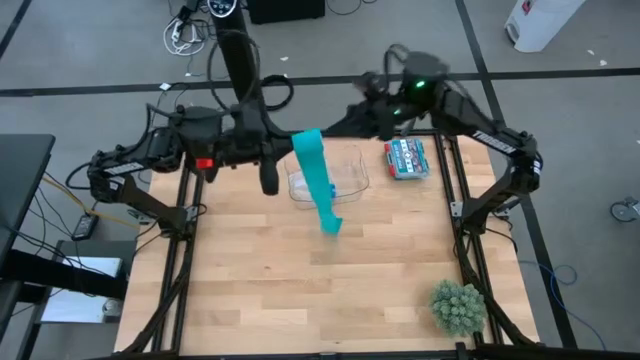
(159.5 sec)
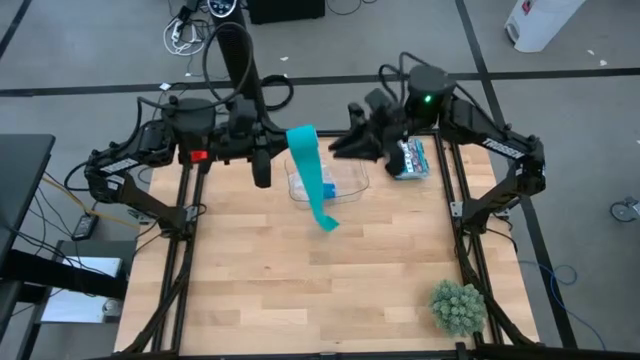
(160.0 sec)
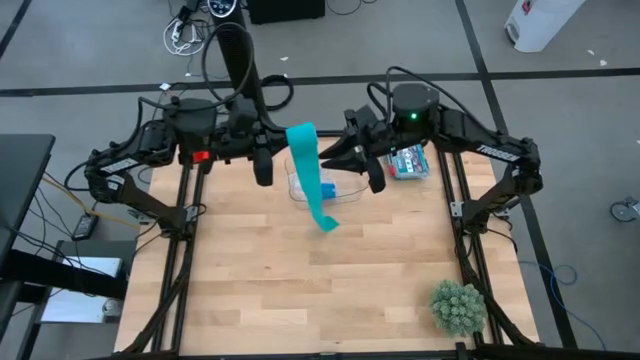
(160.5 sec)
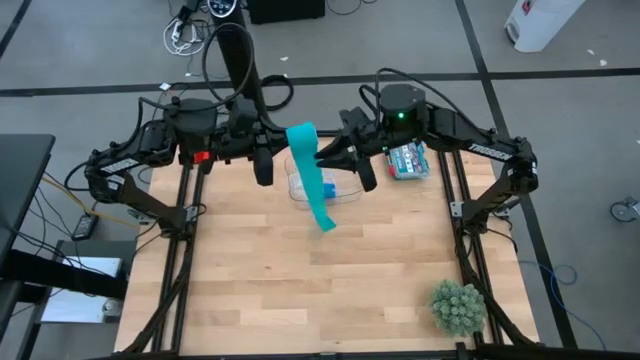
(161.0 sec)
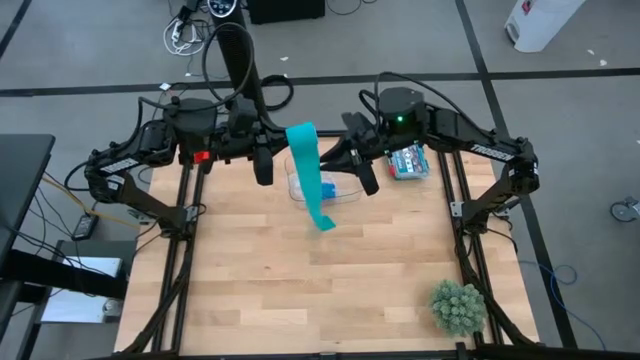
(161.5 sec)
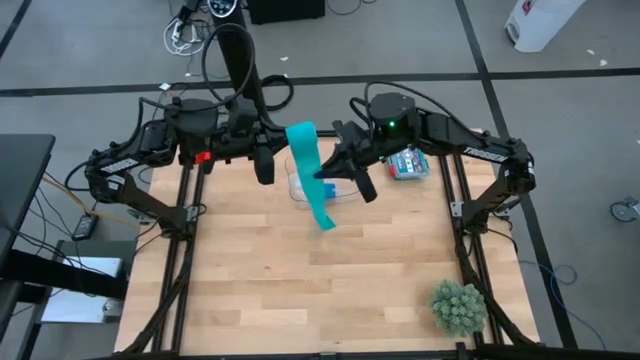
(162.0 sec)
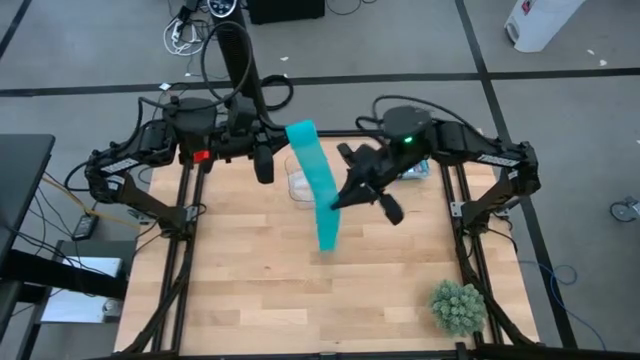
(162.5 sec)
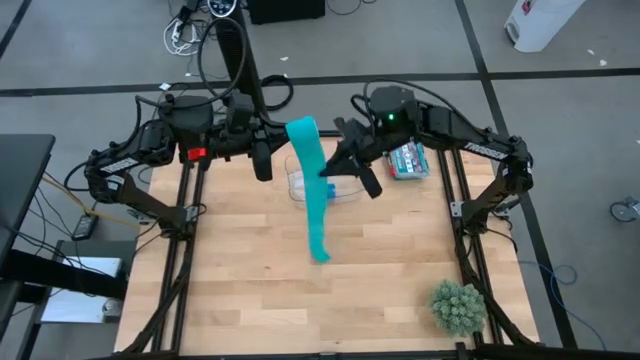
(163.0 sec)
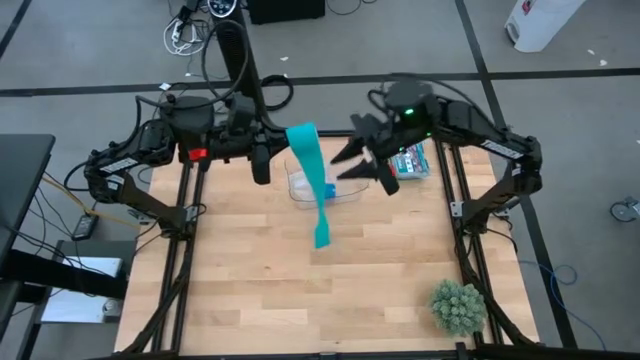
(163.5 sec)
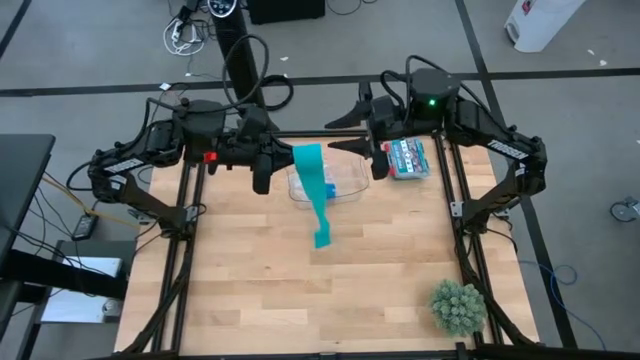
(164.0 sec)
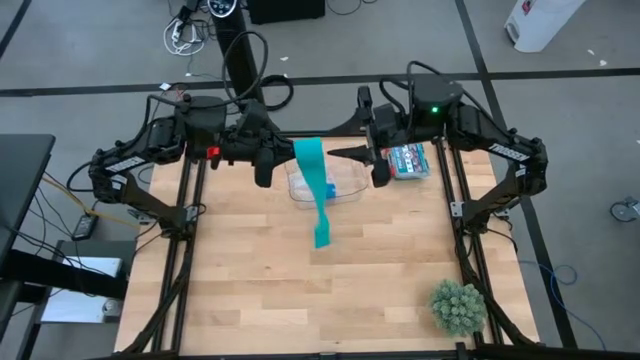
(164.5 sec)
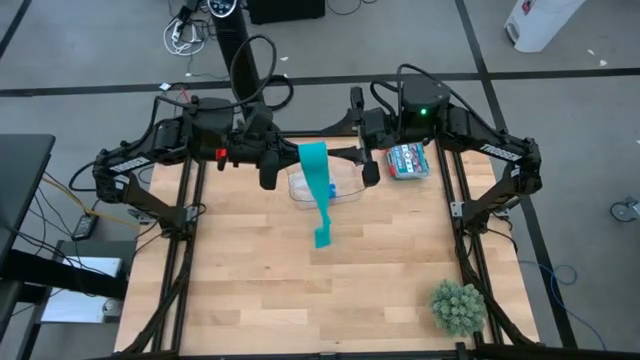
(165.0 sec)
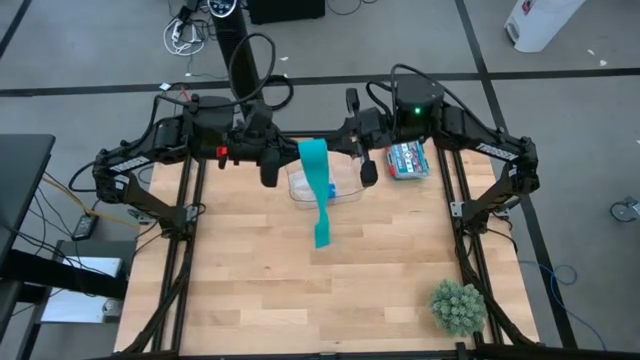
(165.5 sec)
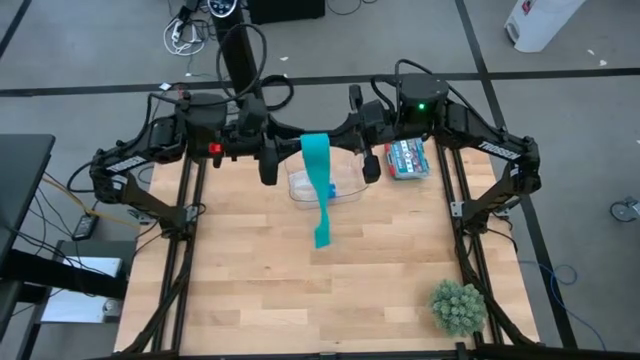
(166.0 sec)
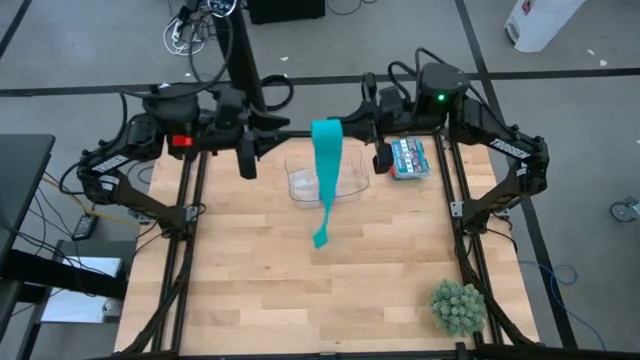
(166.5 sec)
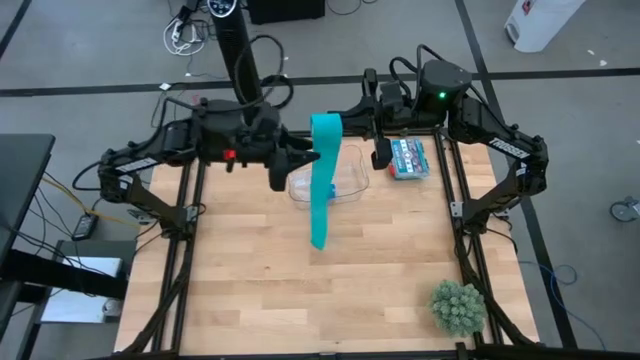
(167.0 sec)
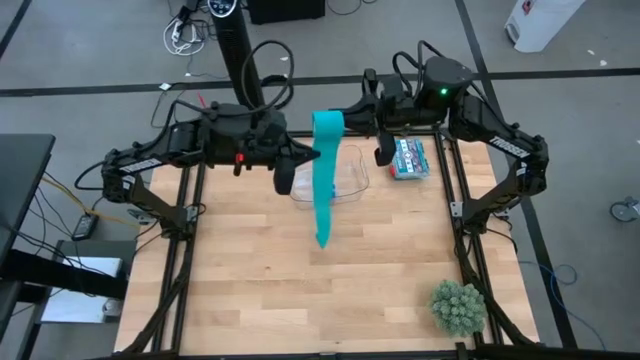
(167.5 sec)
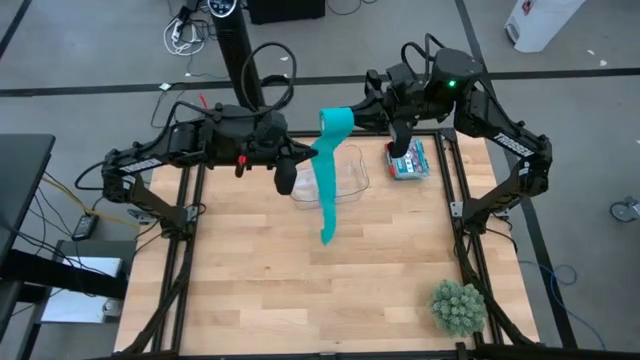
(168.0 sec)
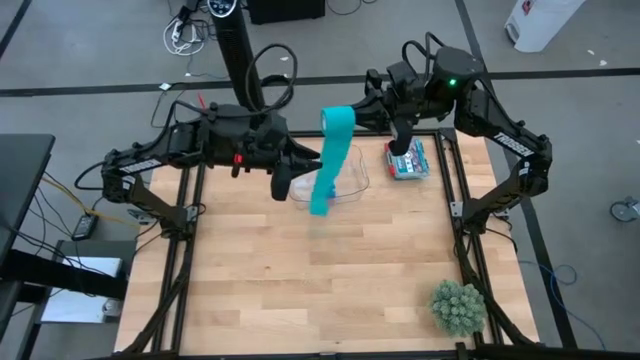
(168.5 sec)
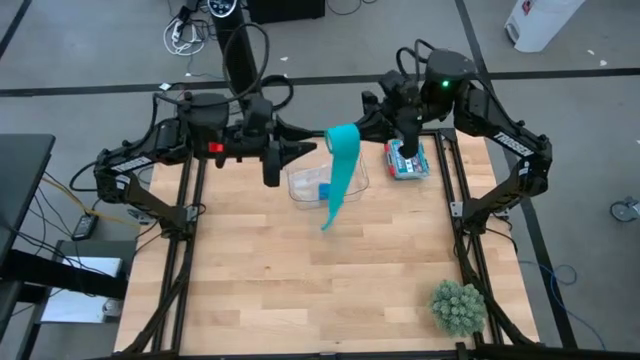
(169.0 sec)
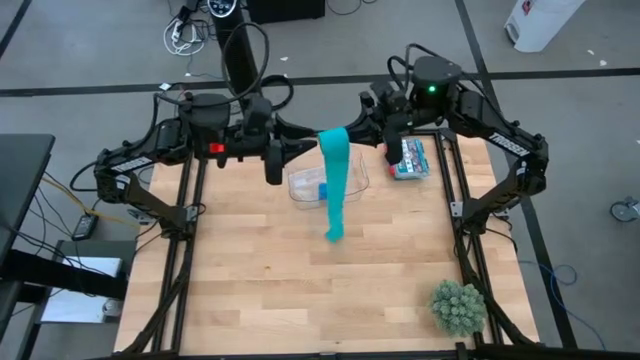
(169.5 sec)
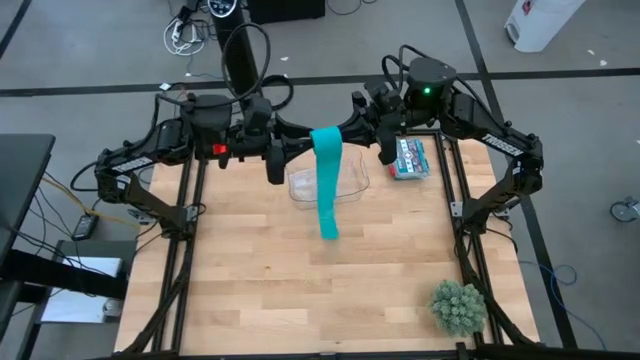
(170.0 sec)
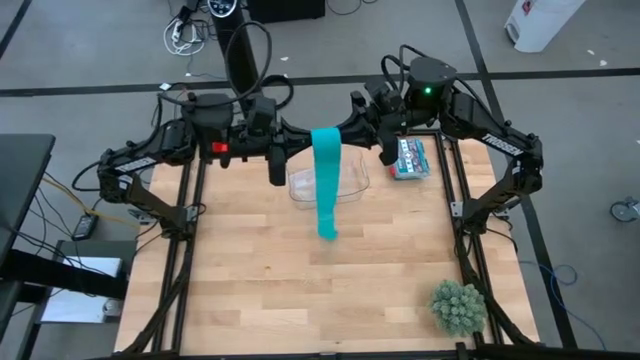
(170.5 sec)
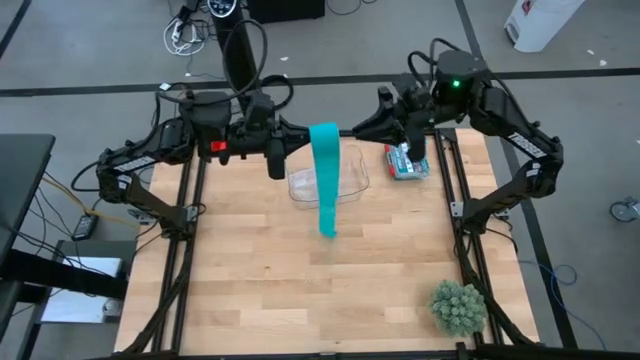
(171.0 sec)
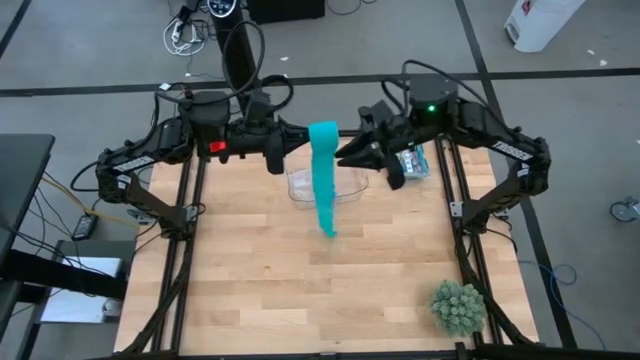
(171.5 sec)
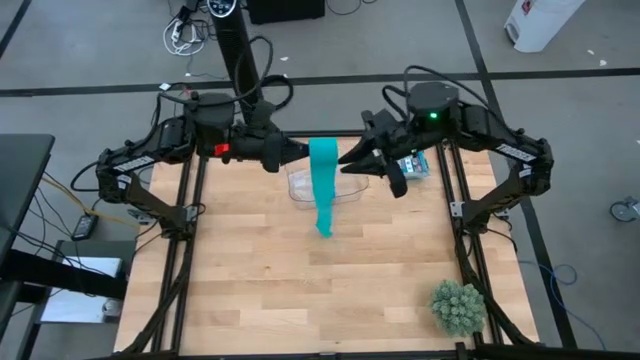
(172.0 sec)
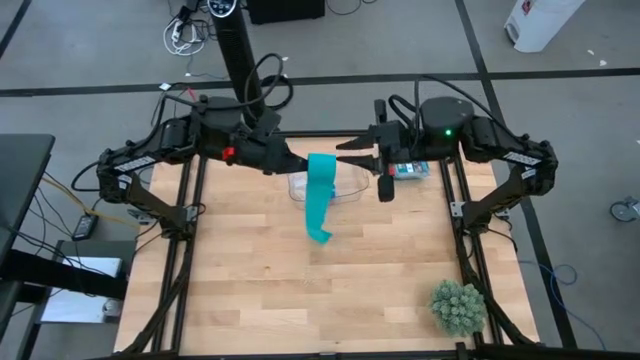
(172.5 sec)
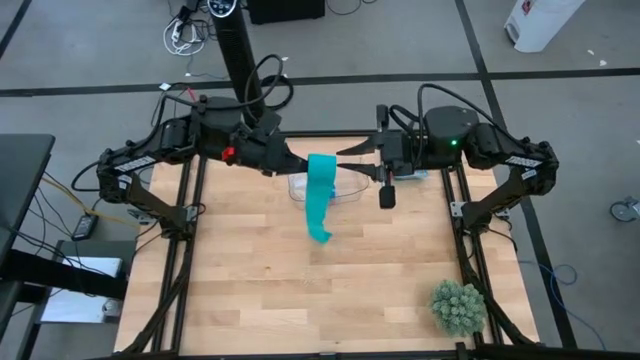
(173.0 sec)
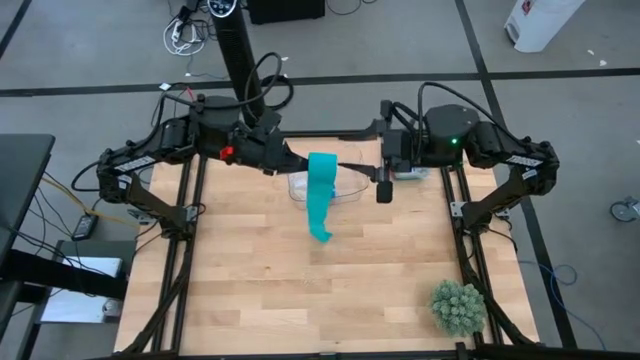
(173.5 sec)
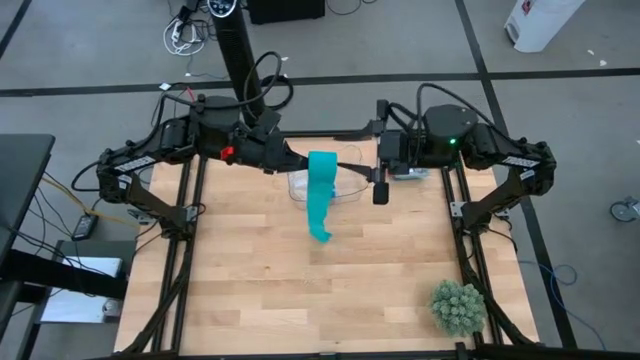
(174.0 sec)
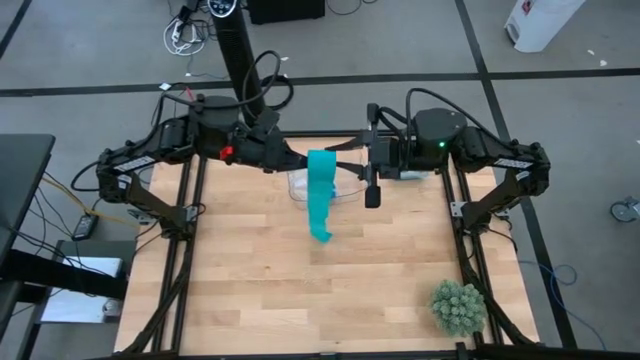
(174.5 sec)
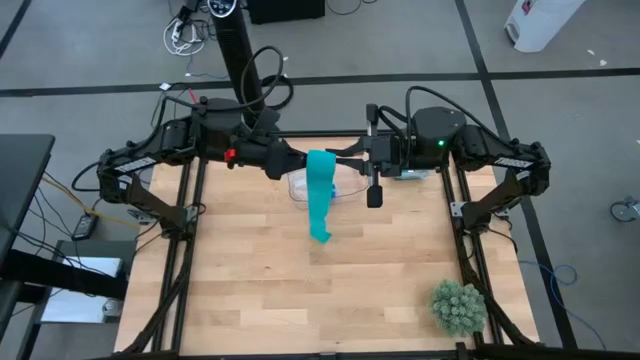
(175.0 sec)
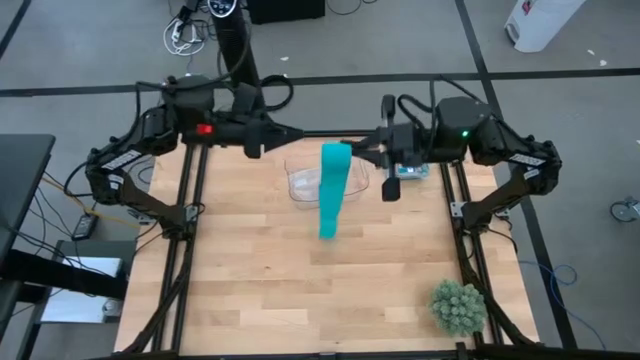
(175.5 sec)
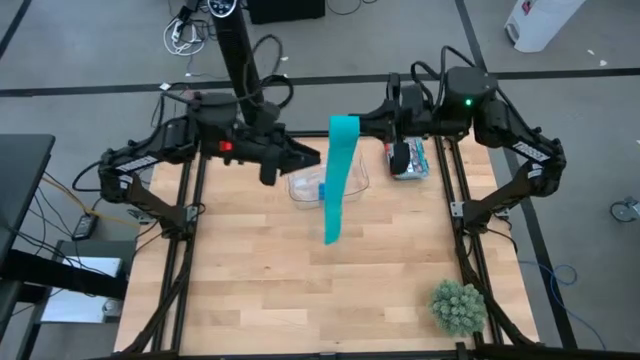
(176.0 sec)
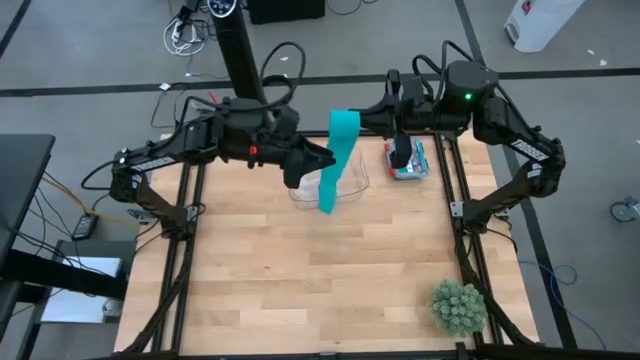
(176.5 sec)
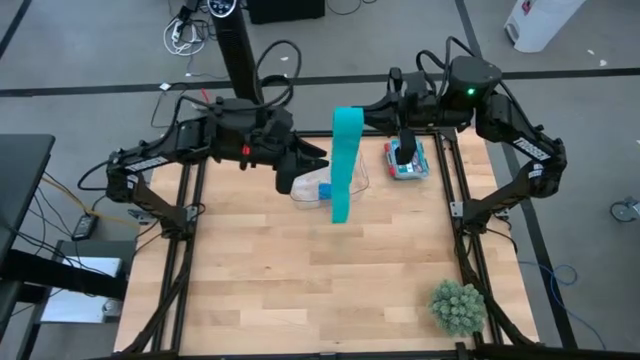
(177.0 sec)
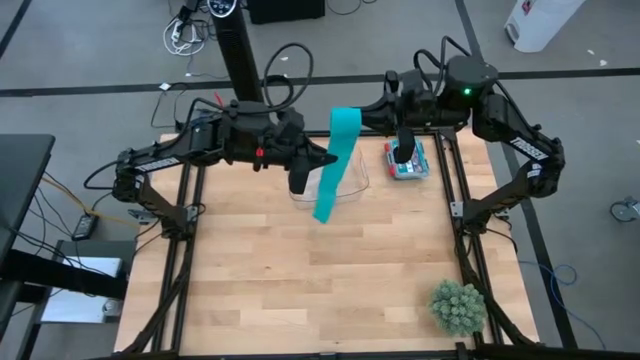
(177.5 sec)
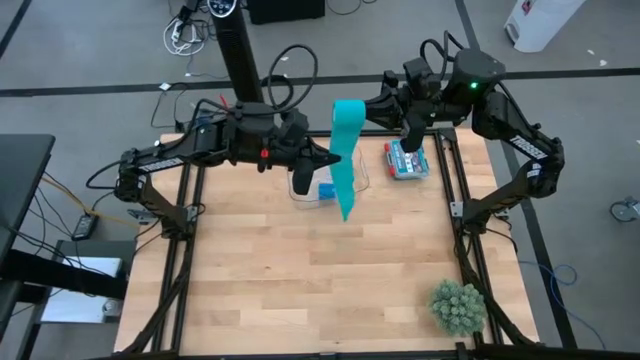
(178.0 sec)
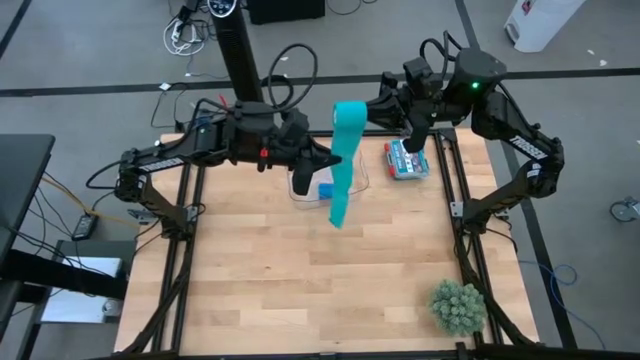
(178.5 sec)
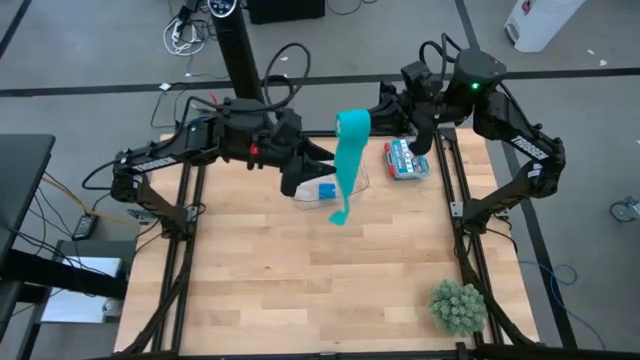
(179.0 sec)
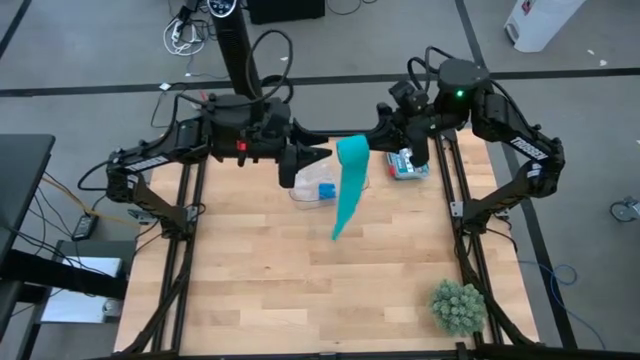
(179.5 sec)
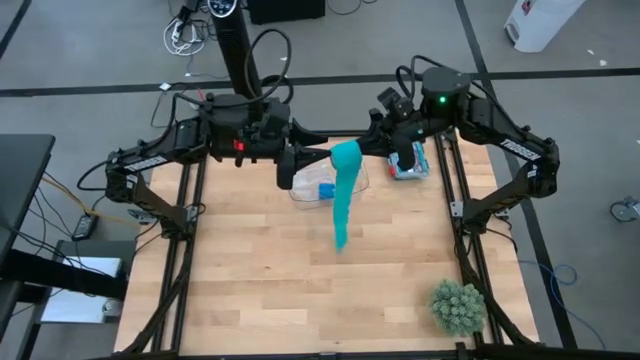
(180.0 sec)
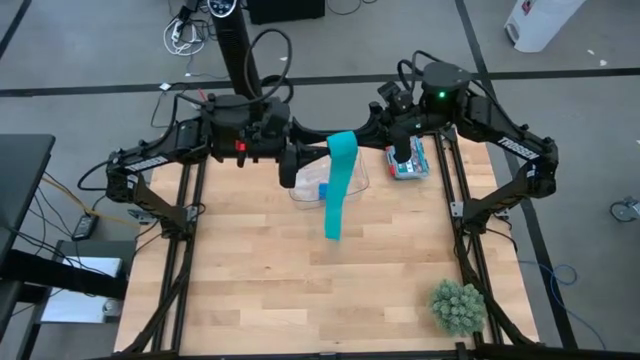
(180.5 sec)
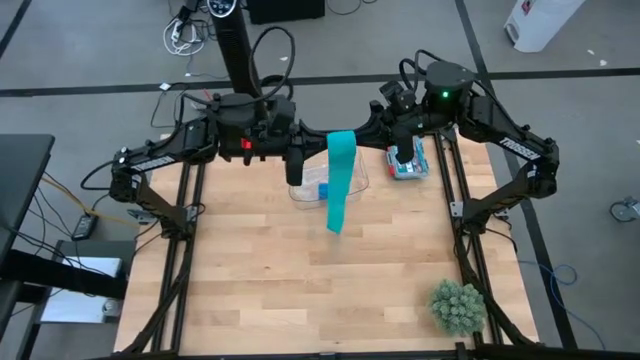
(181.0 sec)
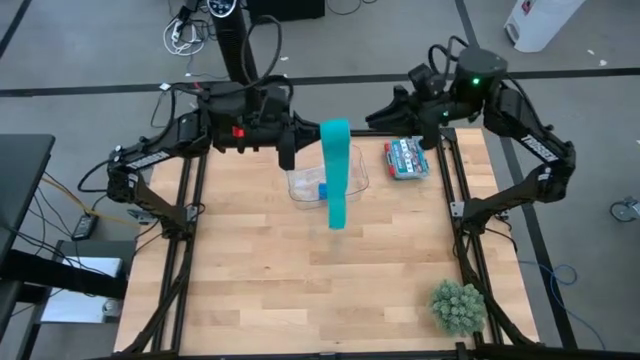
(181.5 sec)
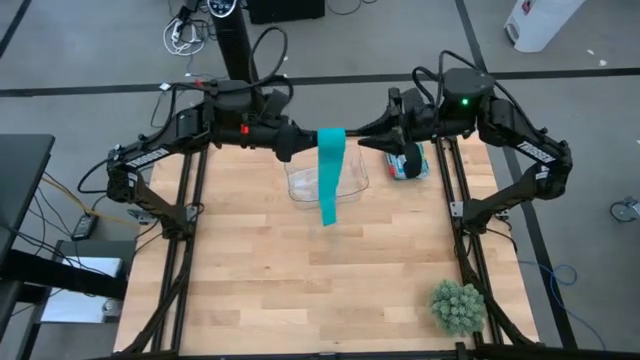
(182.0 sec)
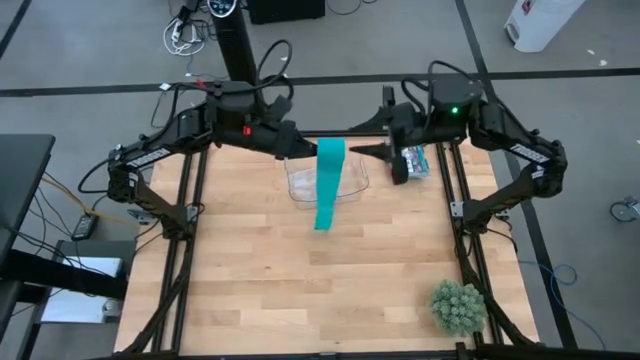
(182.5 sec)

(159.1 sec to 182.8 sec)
Task: Roll bandage
Roll the sky blue bandage
